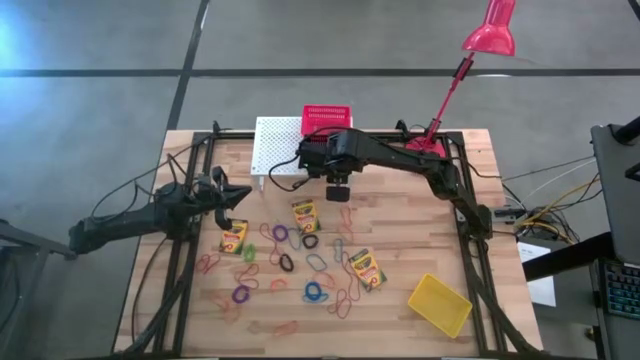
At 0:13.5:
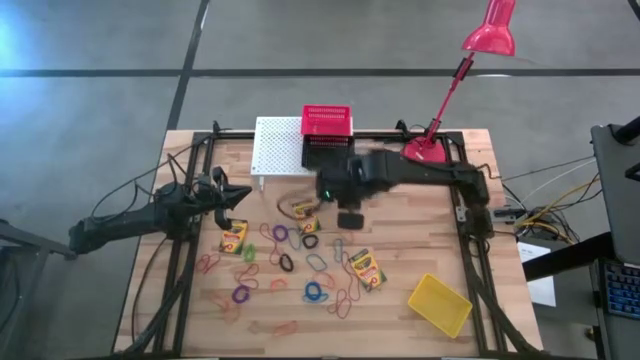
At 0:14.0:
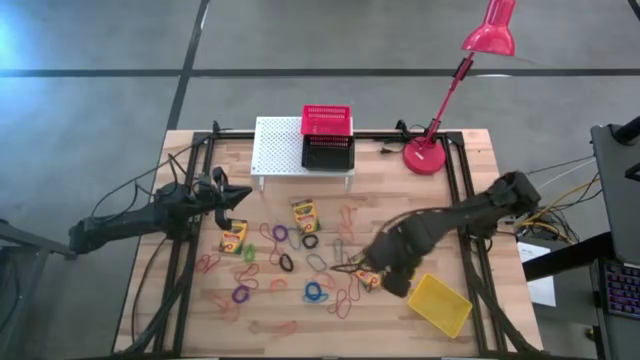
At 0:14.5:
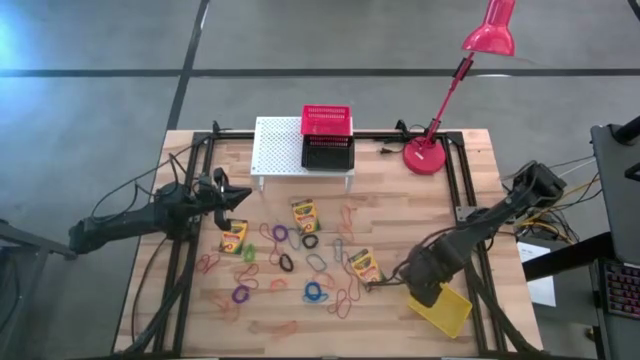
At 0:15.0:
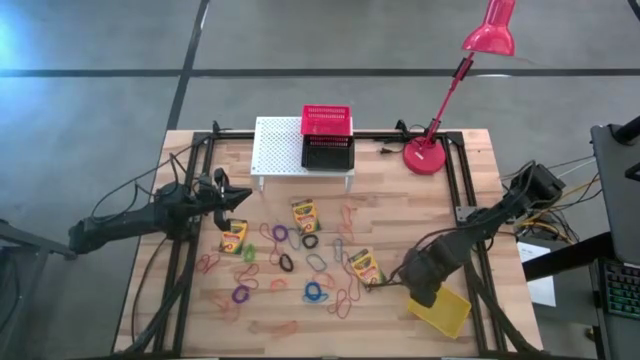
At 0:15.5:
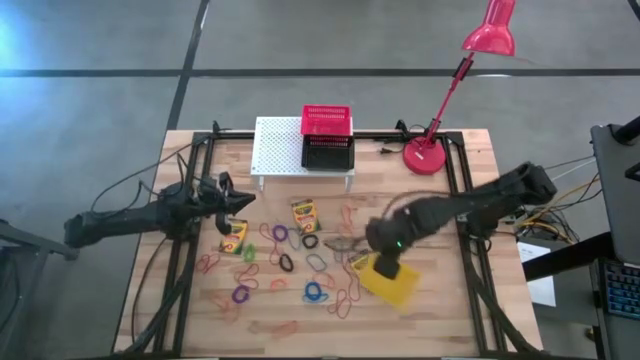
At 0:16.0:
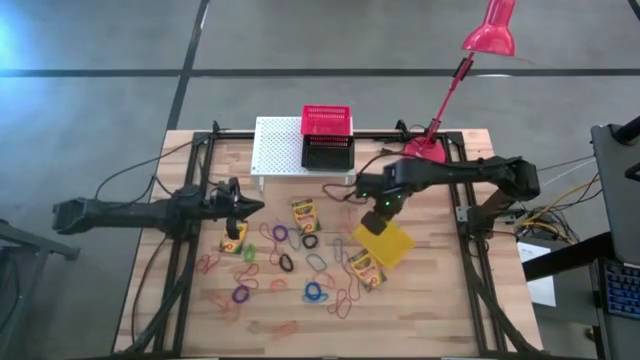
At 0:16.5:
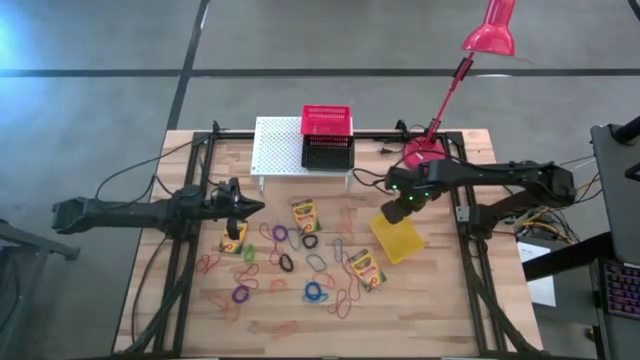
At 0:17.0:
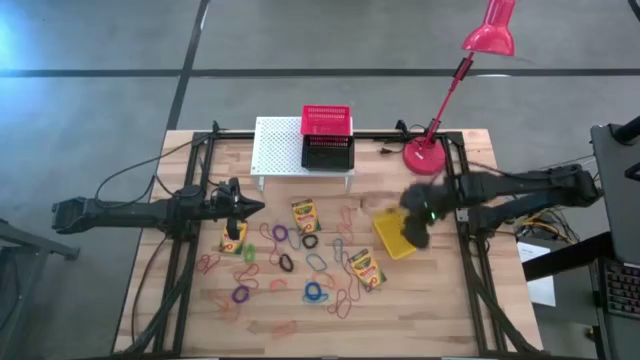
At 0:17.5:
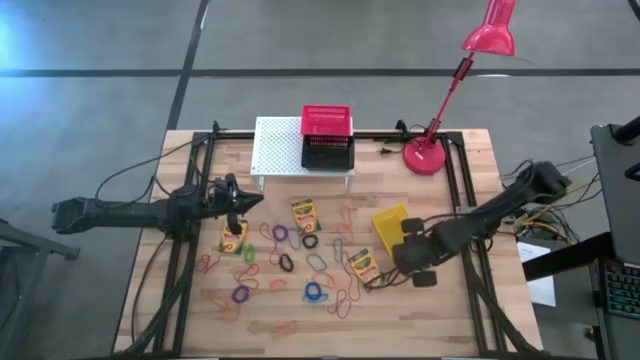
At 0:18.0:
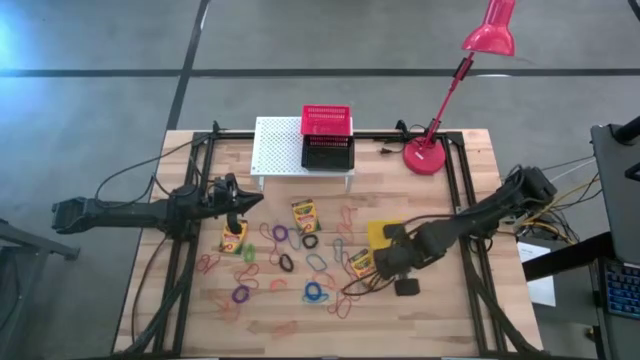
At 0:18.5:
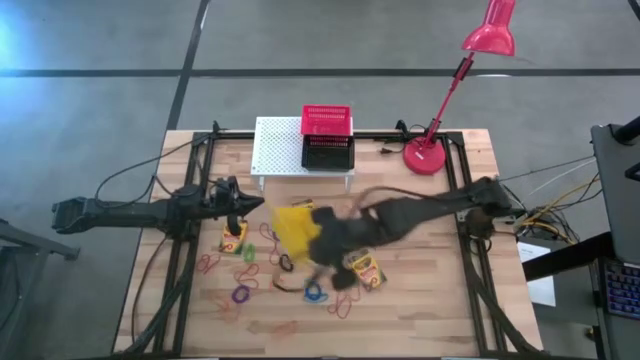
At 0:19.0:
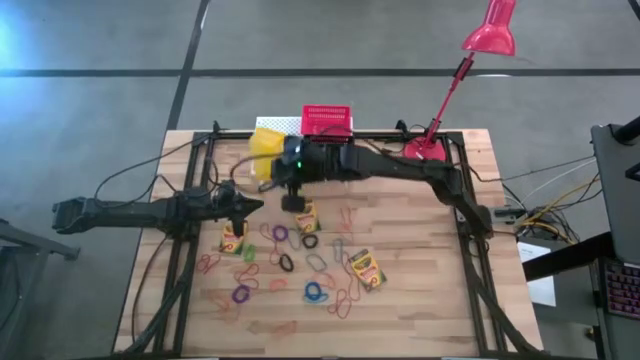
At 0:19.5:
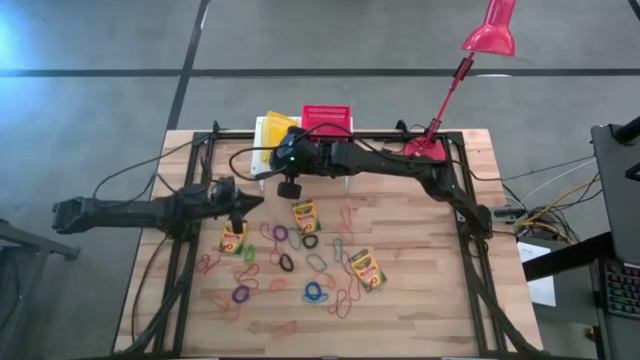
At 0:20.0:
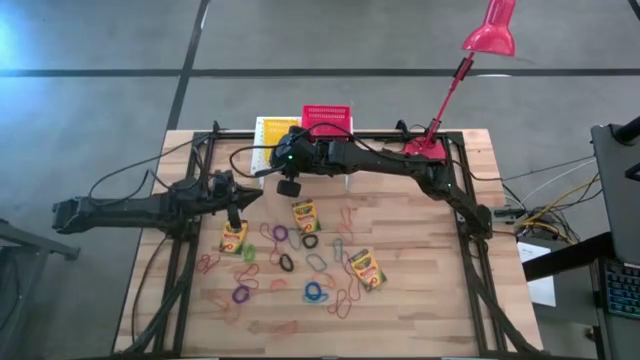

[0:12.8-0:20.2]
Task: Pick & Place Office Desk Supplies
Put the yellow bin on the shelf

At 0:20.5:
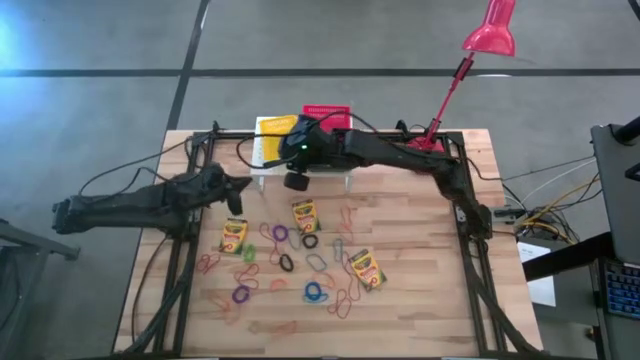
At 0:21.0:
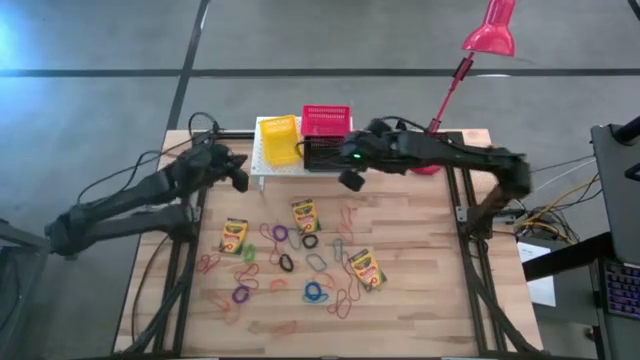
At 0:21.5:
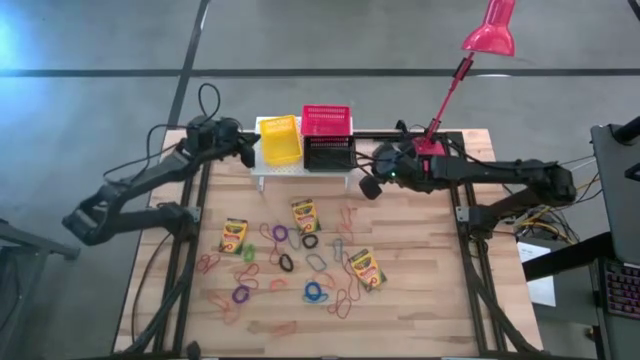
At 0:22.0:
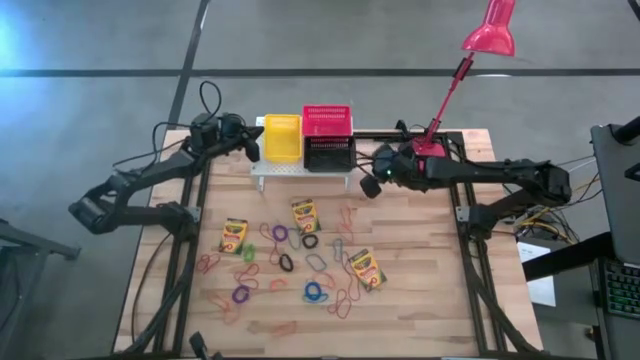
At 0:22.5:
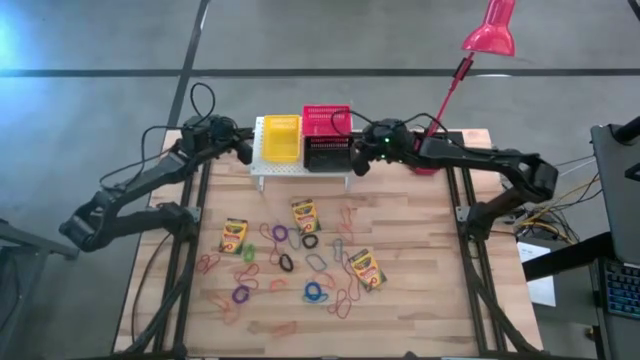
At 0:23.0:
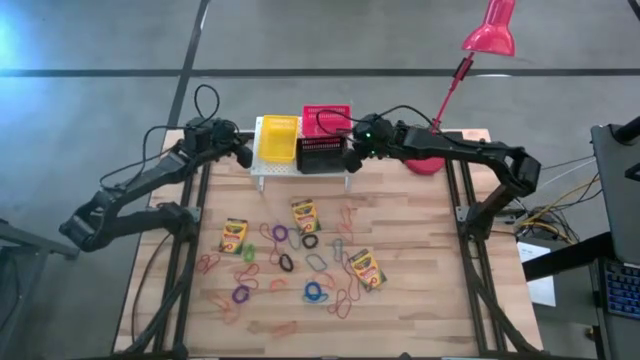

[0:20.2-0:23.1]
Adjust the black bin

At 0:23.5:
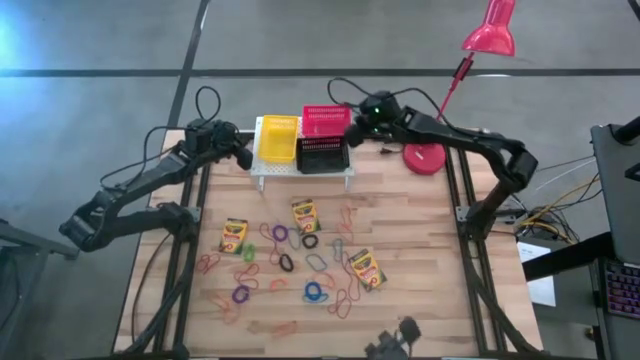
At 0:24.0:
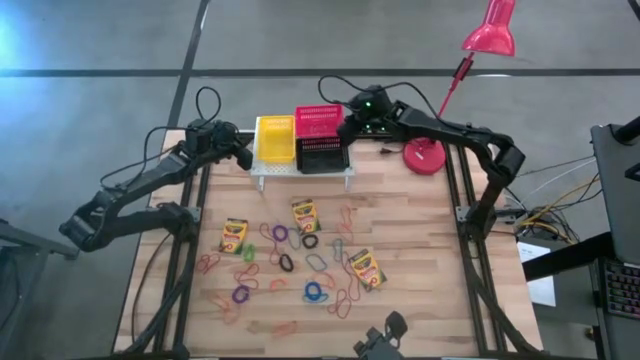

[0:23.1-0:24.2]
Adjust the red bin

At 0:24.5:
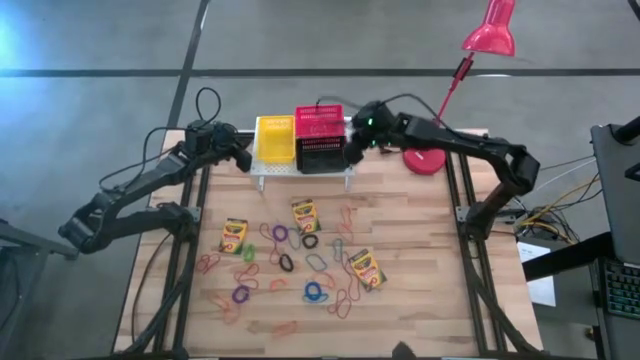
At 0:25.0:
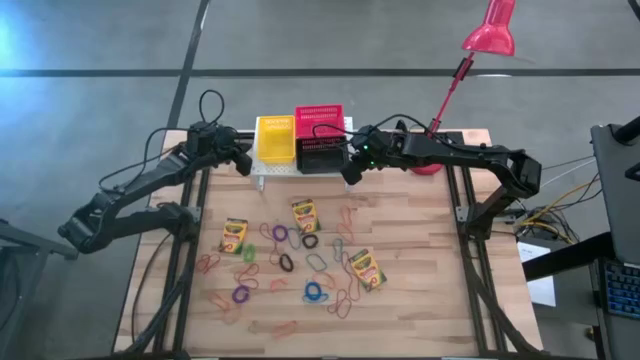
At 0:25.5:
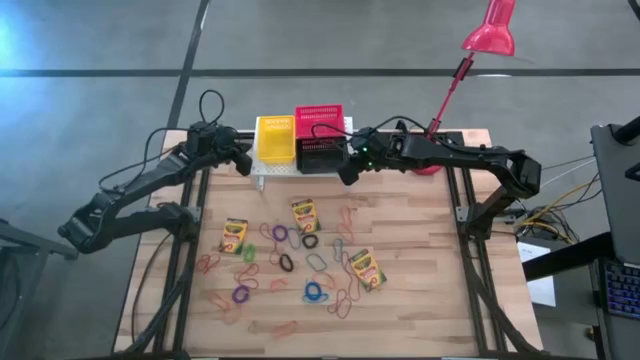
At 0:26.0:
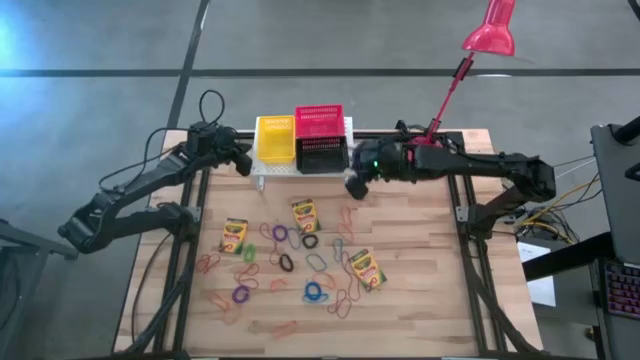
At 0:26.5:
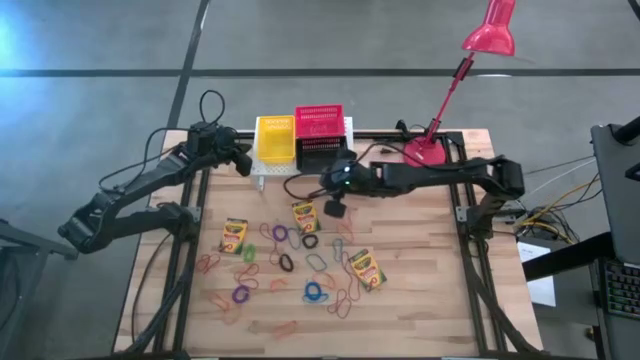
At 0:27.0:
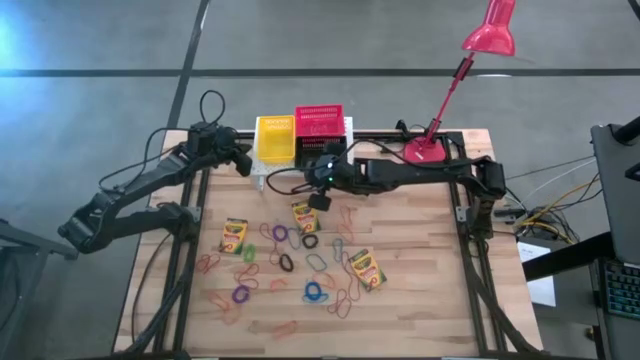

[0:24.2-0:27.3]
Adjust the black bin

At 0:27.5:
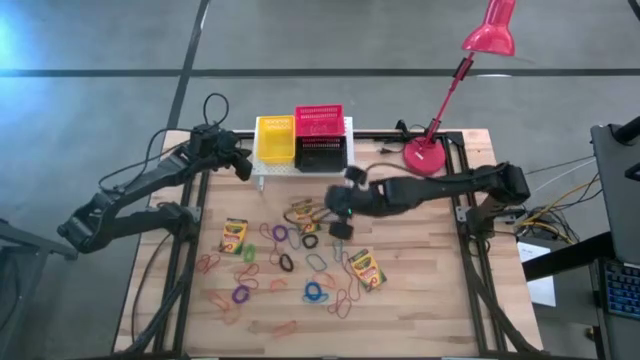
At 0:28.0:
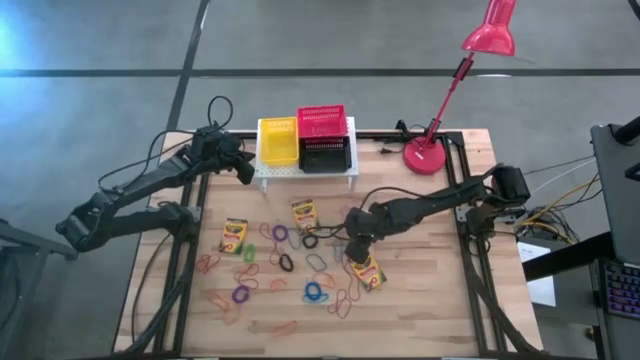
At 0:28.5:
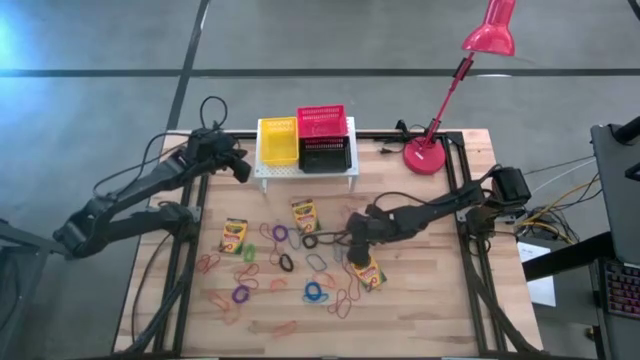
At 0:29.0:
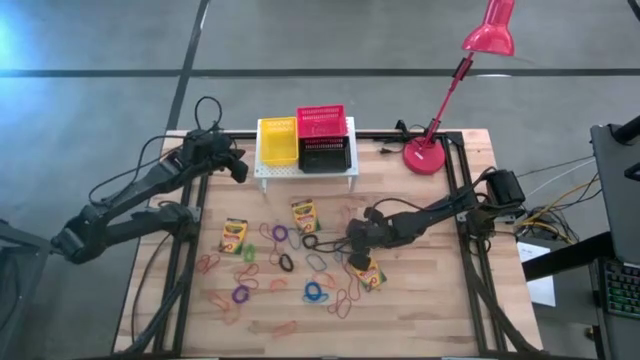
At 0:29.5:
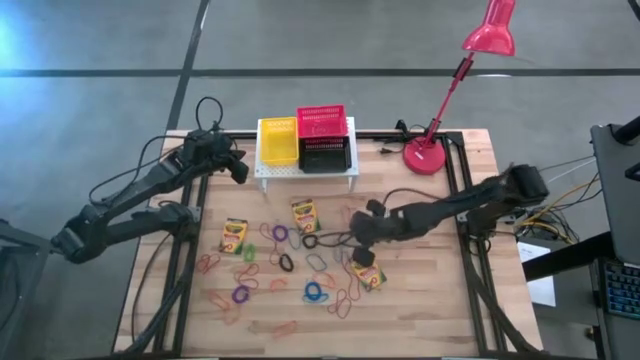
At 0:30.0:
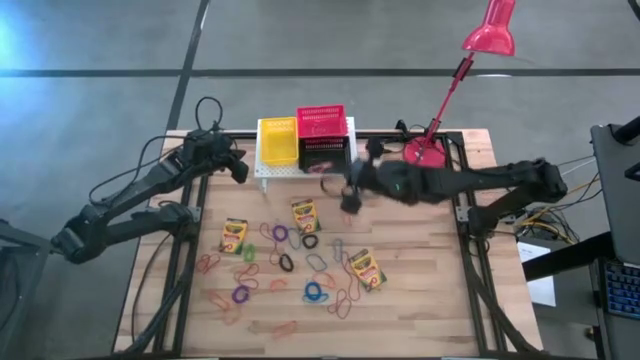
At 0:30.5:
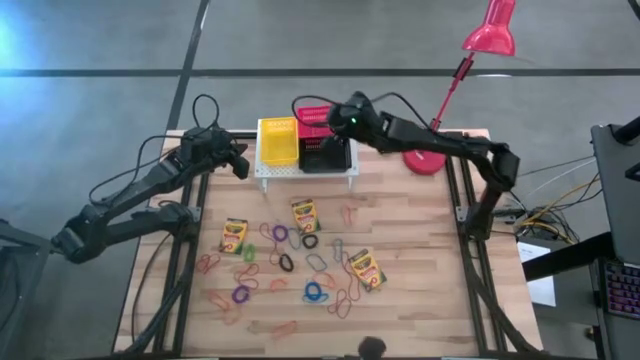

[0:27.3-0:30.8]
Put the orange rubber band into the red bin

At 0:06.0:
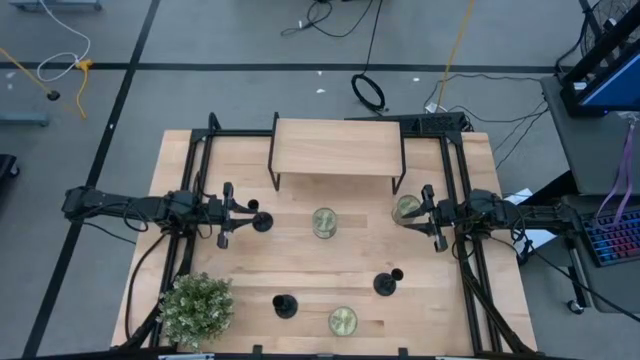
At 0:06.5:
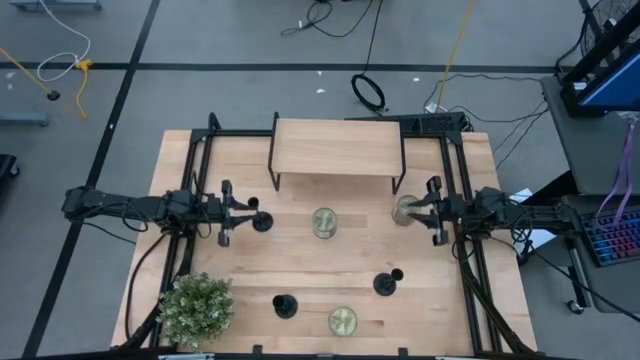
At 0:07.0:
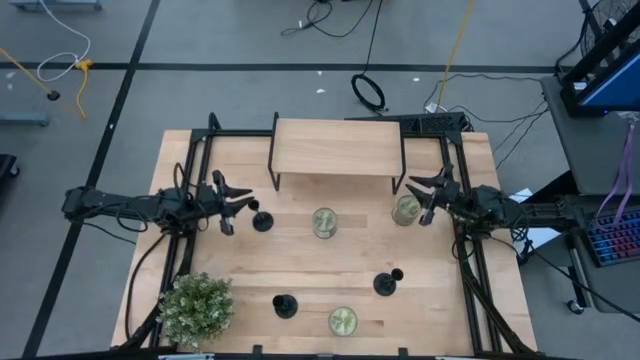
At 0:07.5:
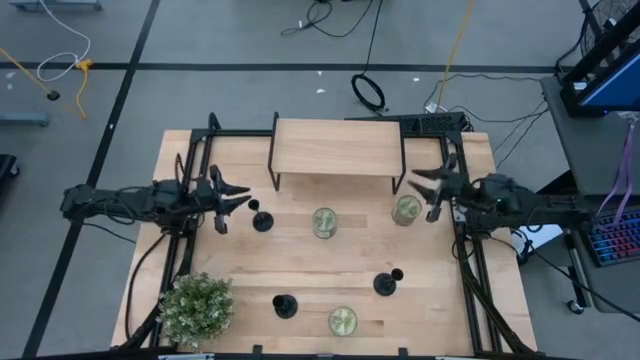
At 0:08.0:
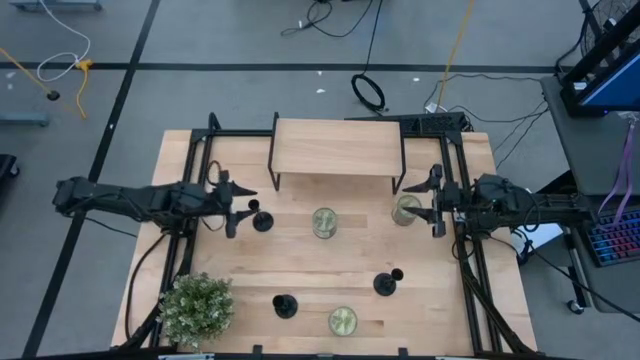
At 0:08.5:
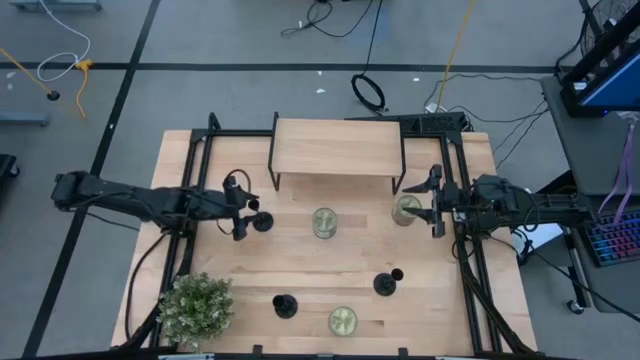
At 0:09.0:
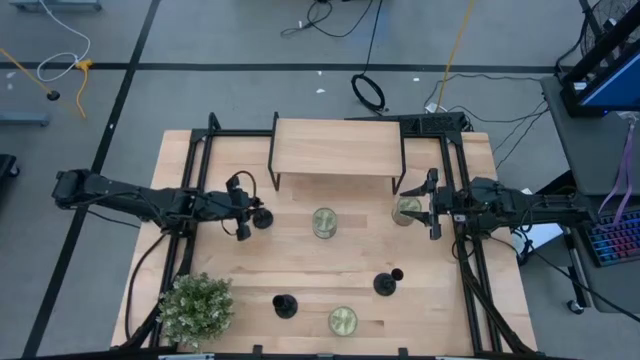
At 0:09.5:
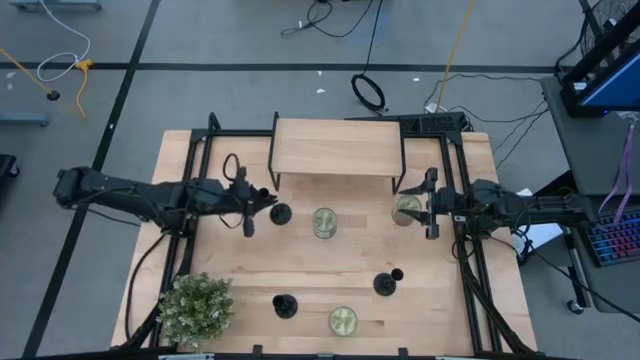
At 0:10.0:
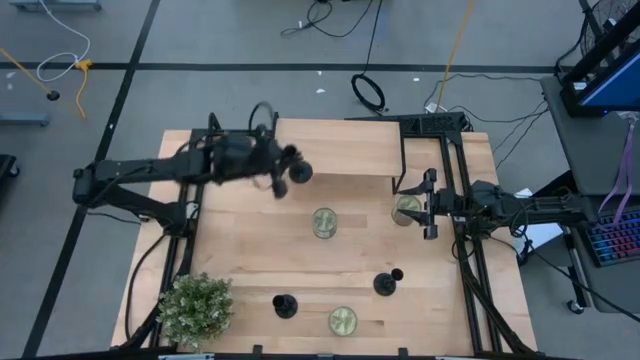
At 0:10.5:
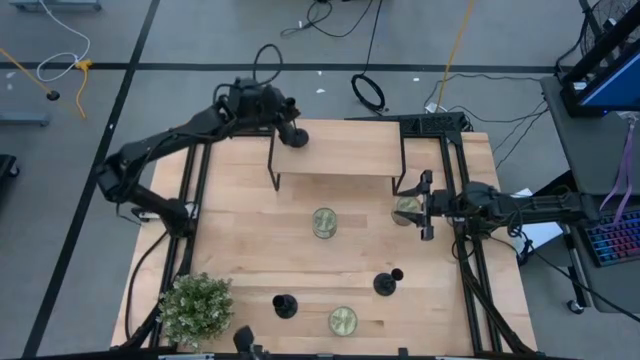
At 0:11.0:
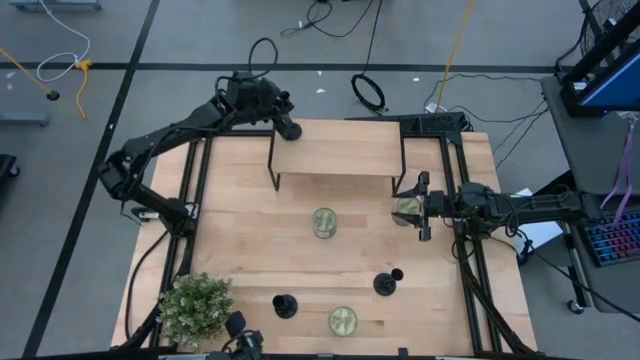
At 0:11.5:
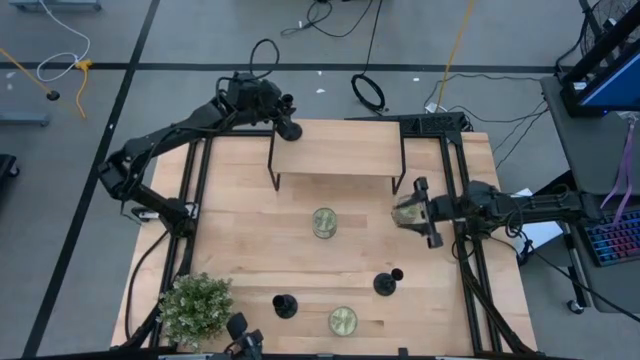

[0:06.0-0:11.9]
Task: Pick & Place candle stick holders
Put the top black candle holder on the shelf
